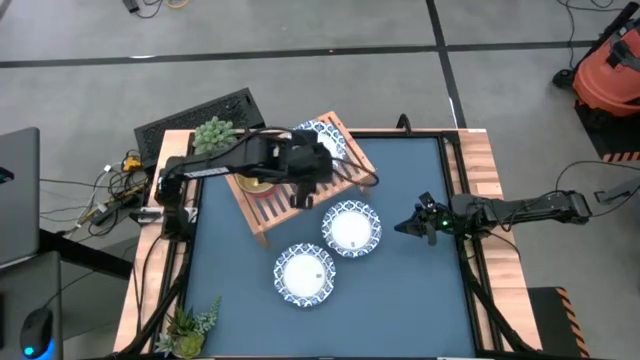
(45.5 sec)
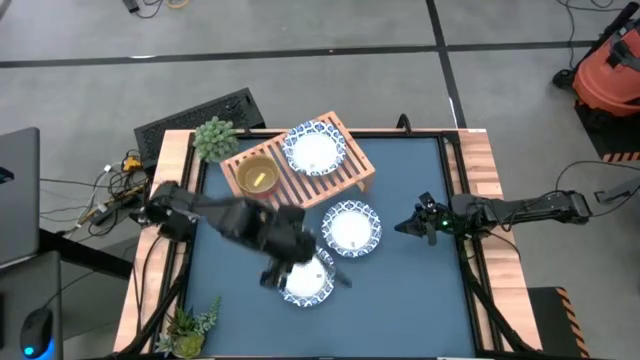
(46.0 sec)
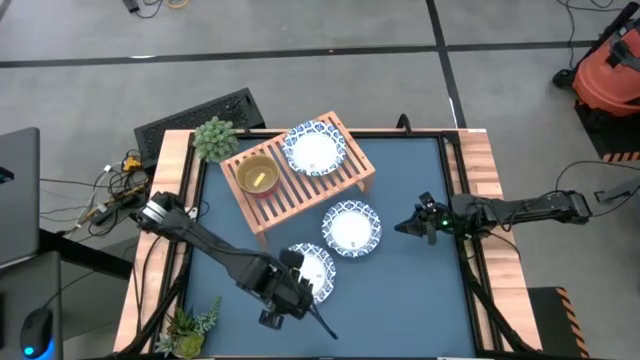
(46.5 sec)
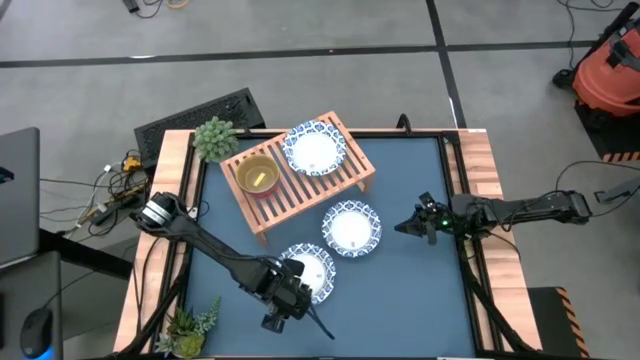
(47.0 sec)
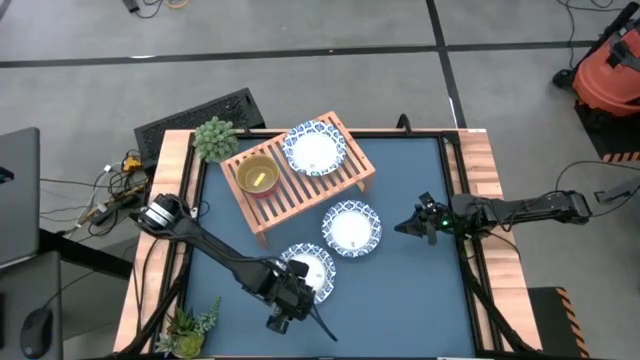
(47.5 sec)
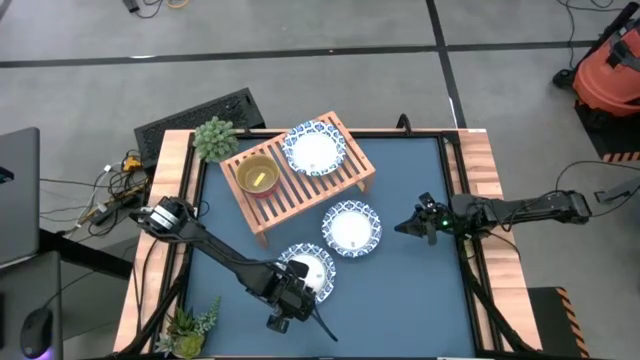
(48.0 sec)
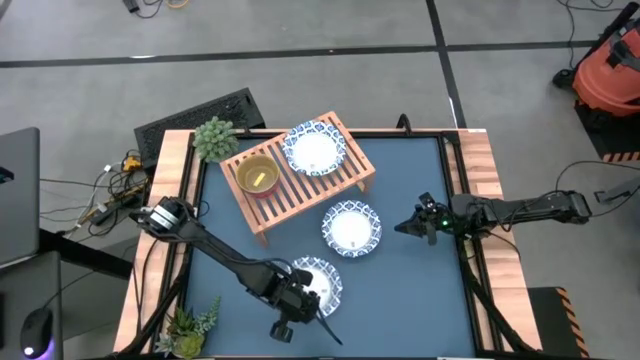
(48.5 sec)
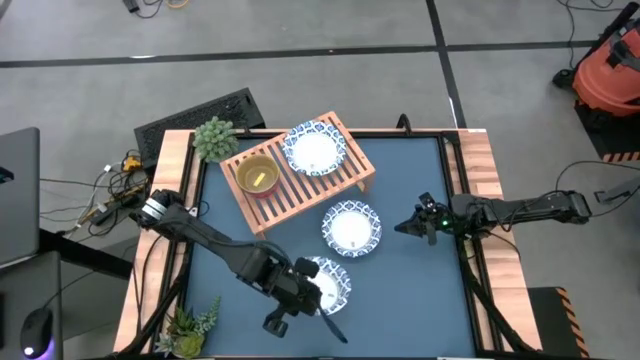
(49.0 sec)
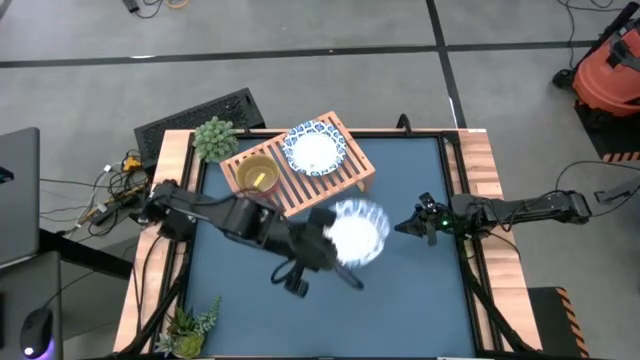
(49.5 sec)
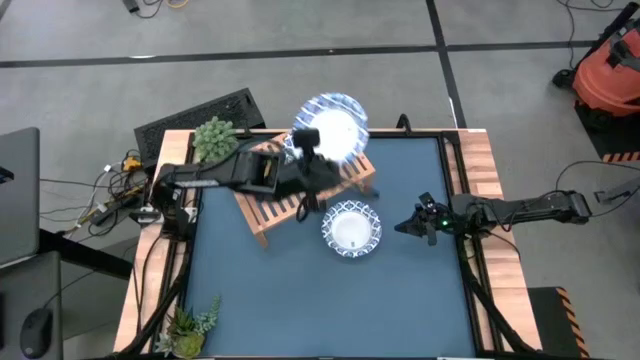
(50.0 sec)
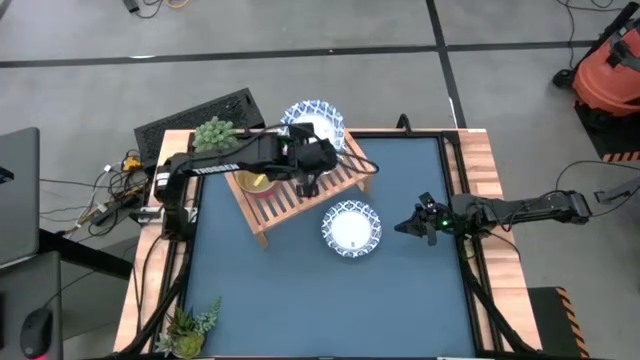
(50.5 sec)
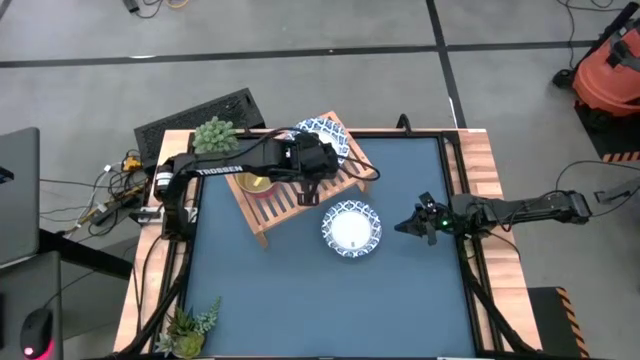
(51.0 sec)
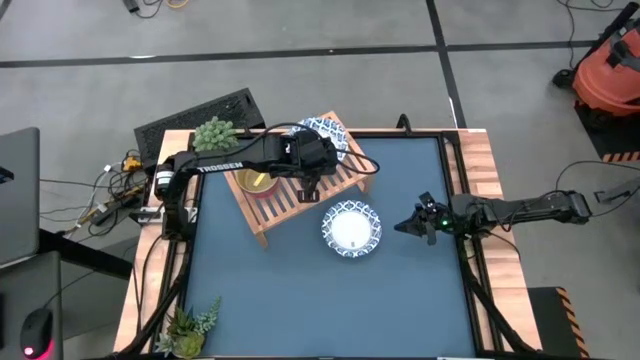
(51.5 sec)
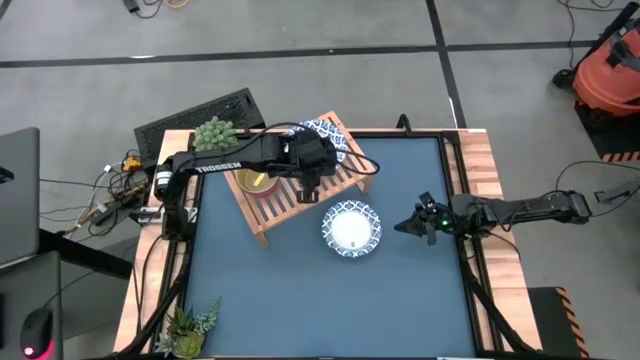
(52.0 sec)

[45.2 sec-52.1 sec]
Task: Place and stack bowls onto a shelf
Stack the left white bowl into the white bowl on the shelf

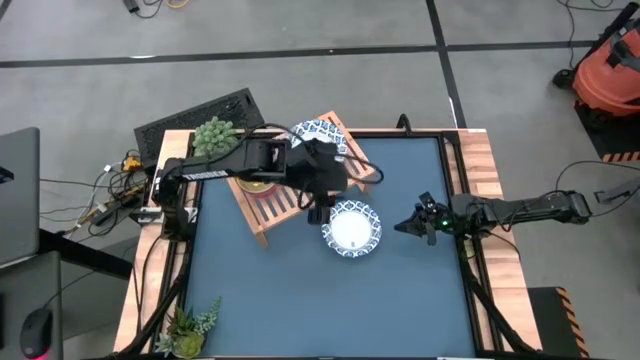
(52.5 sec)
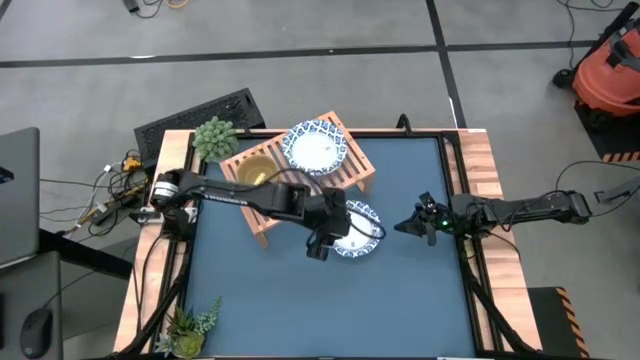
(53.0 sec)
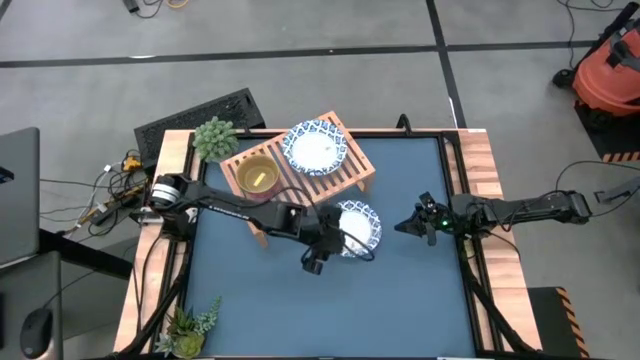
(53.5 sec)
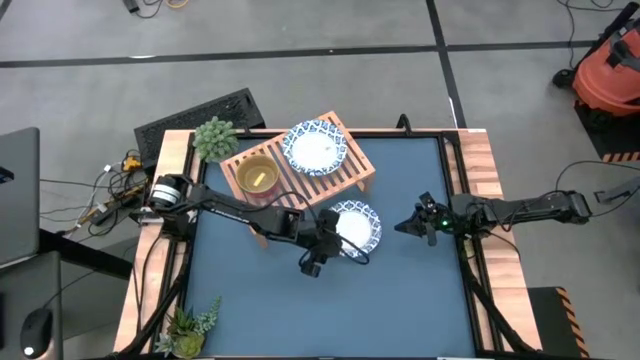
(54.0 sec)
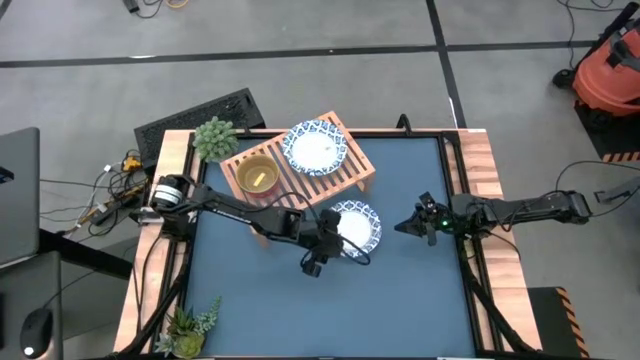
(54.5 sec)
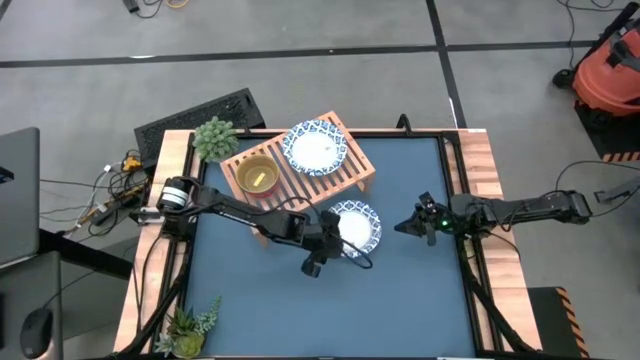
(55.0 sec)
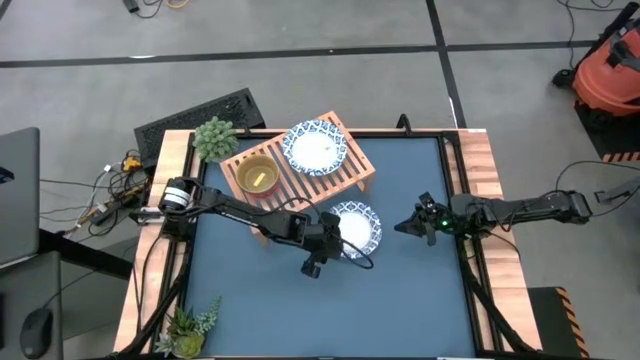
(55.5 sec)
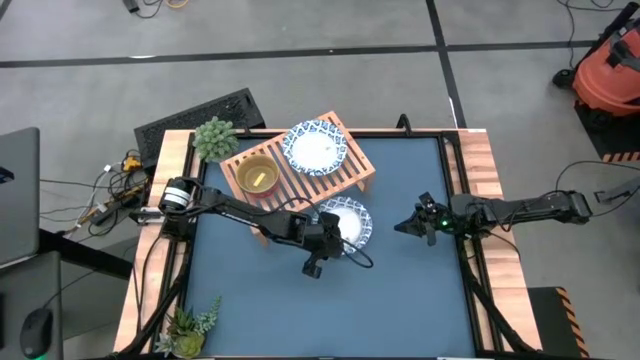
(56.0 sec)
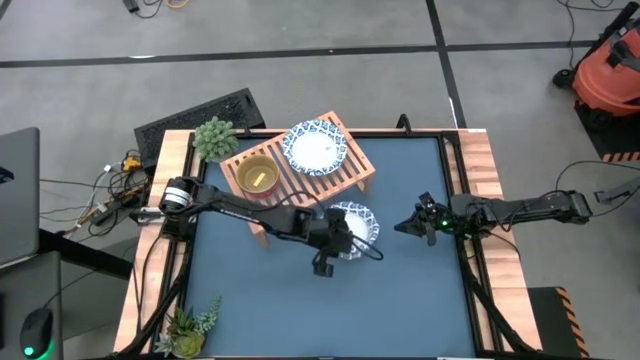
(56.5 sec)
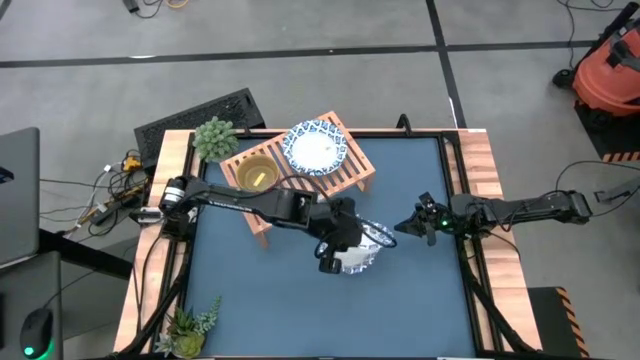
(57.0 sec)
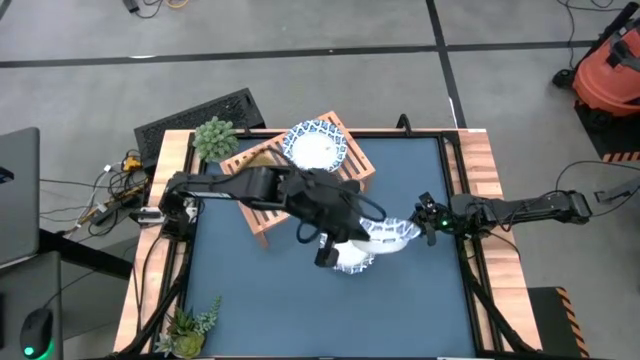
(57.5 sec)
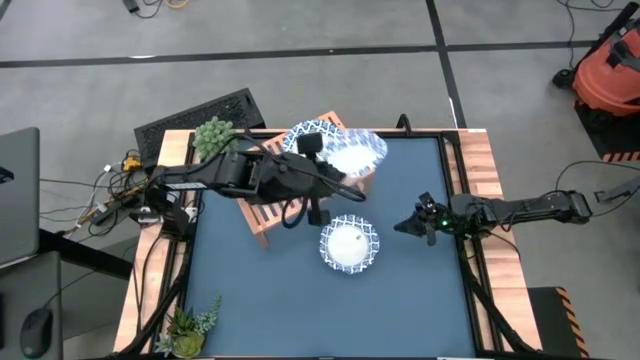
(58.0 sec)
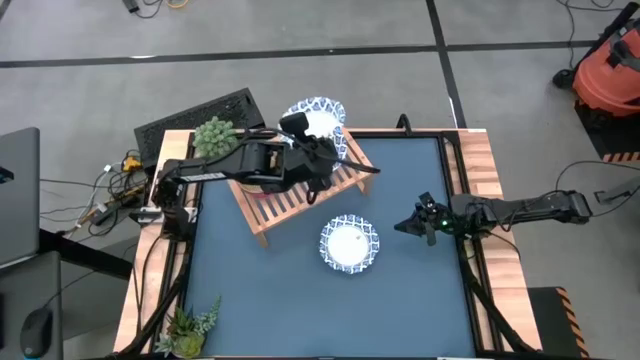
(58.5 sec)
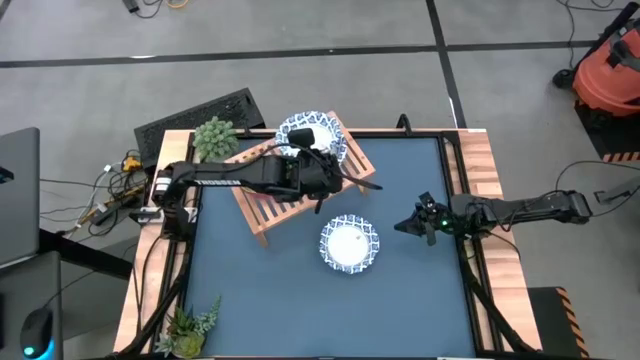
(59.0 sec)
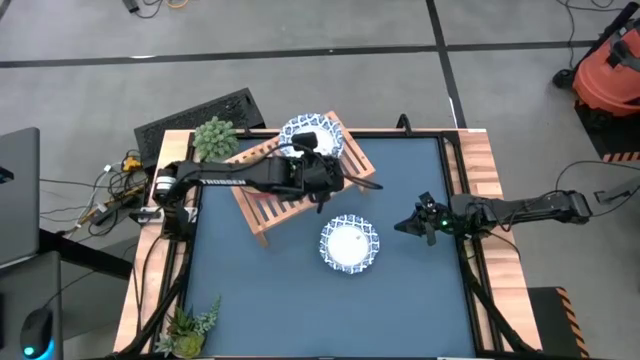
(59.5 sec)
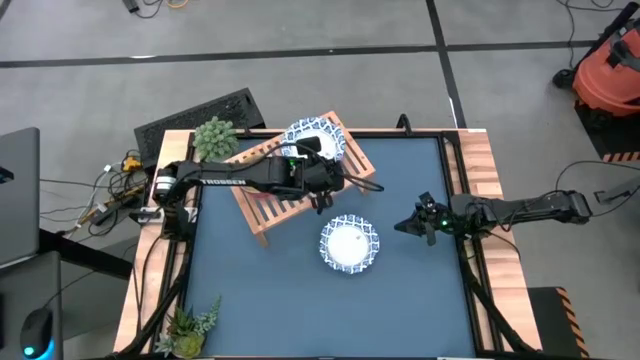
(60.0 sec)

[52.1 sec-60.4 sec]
Stack the white bowl into the white bowl on the shelf

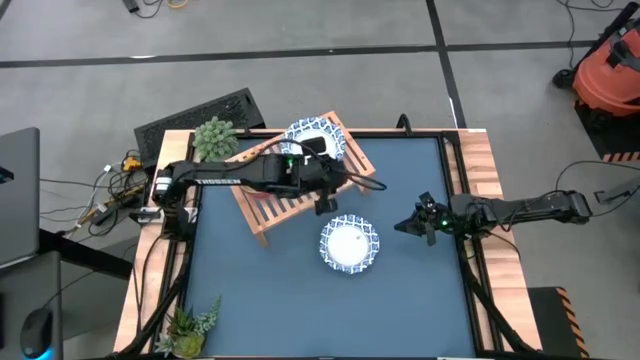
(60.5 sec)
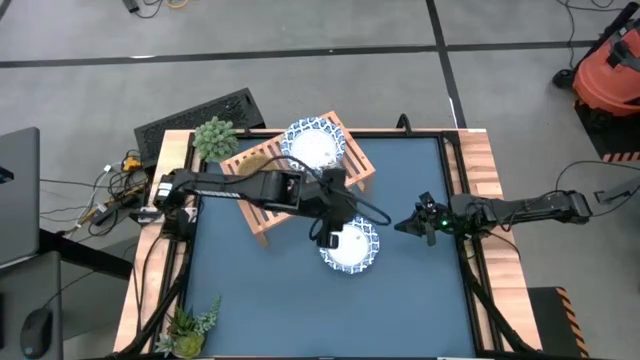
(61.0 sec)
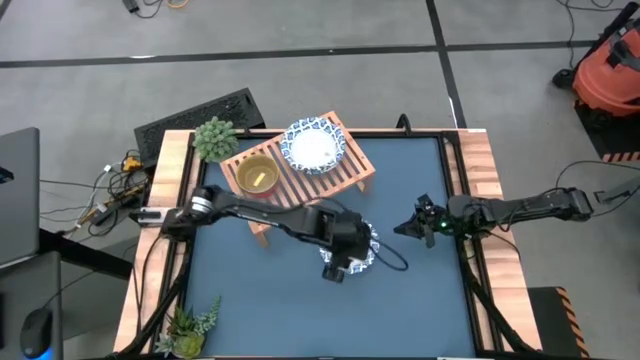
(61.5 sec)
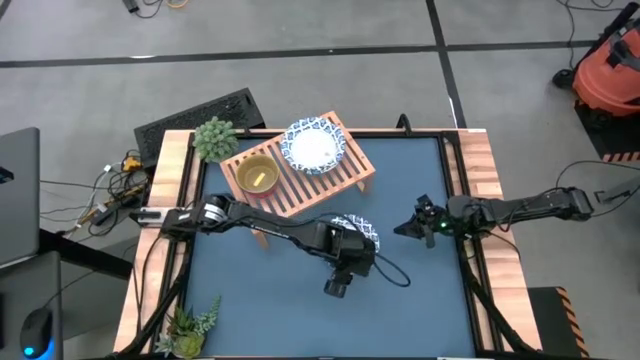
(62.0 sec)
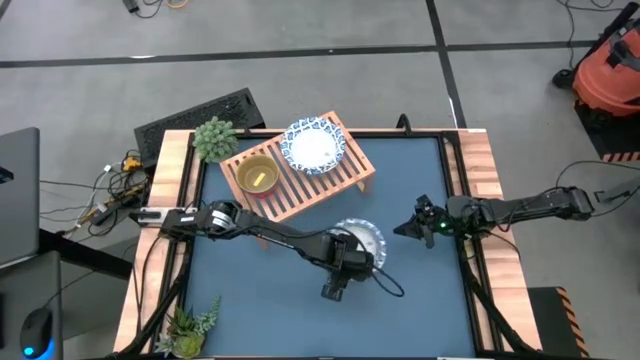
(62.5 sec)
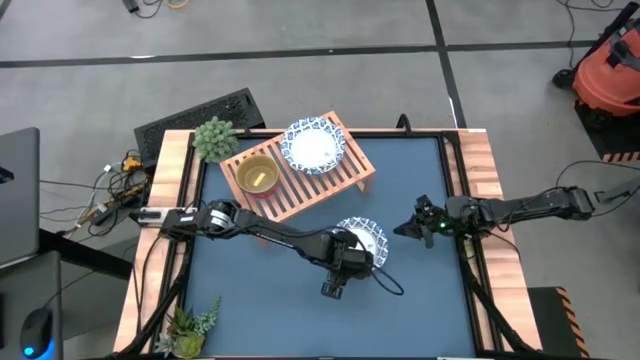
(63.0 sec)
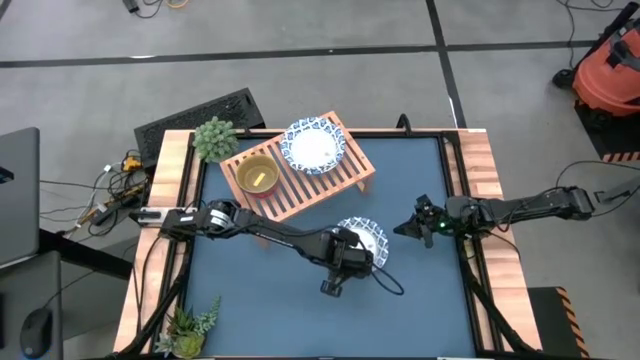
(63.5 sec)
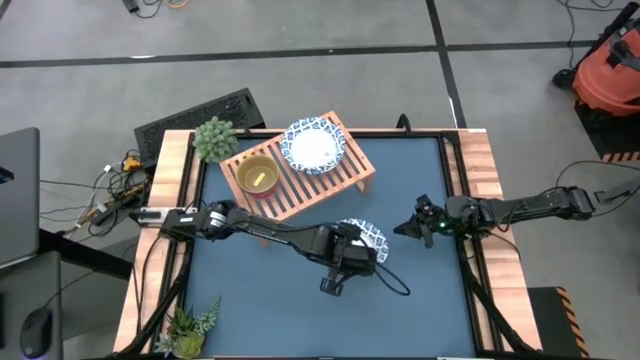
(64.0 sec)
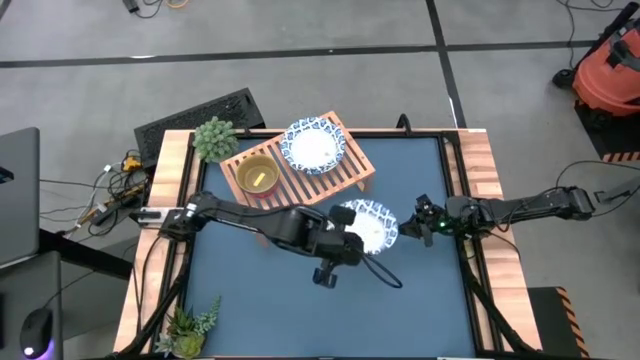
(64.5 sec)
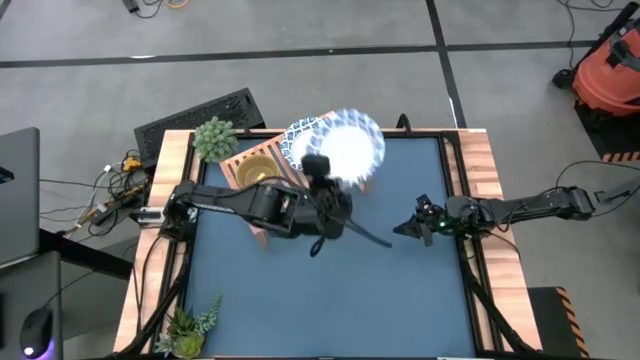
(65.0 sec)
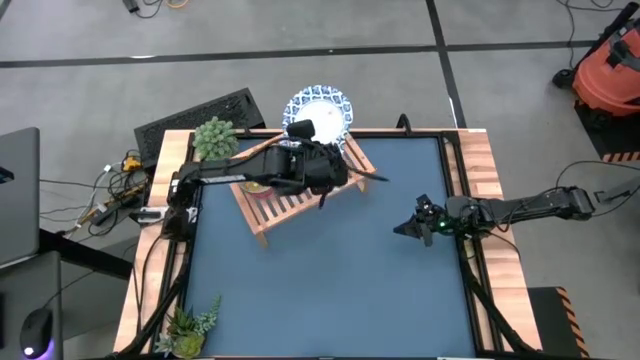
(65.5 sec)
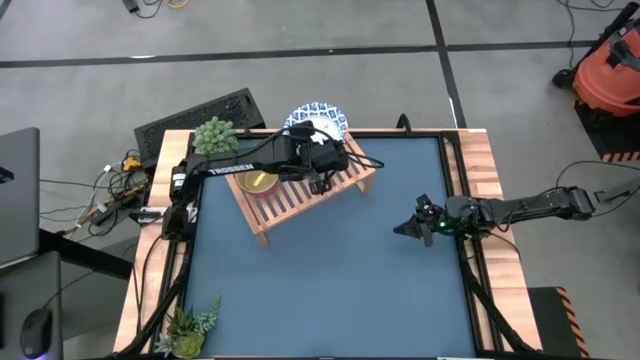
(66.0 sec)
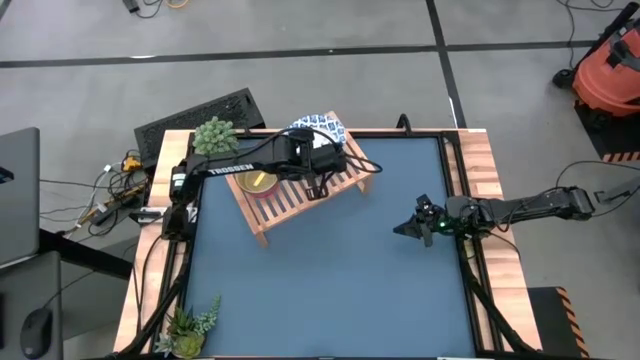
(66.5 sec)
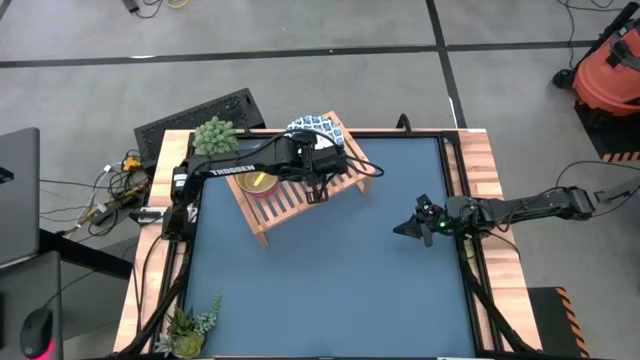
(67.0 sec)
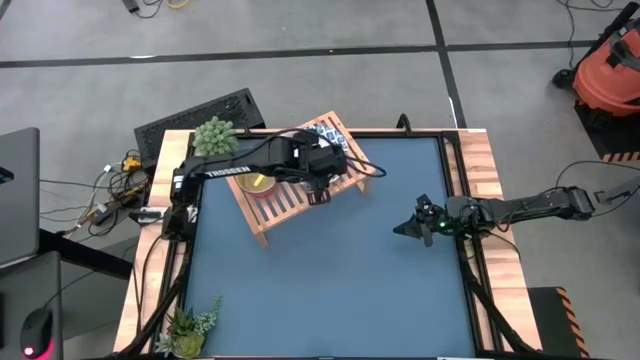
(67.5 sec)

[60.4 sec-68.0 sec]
Stack the white bowl into the white bowl on the shelf
